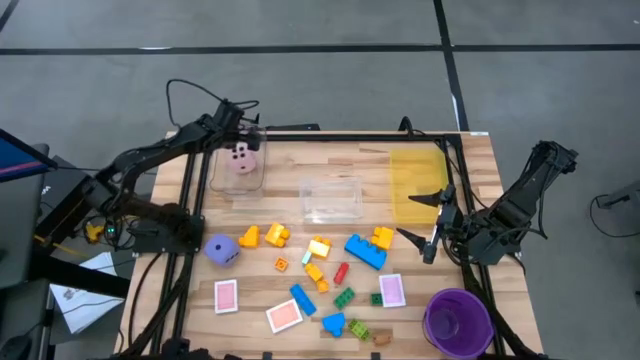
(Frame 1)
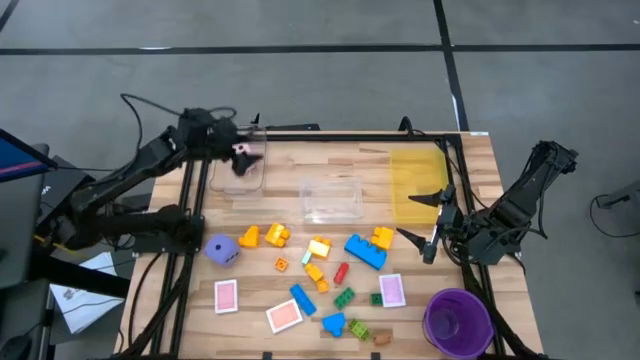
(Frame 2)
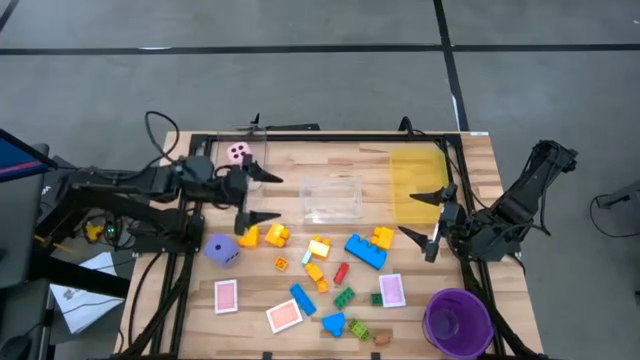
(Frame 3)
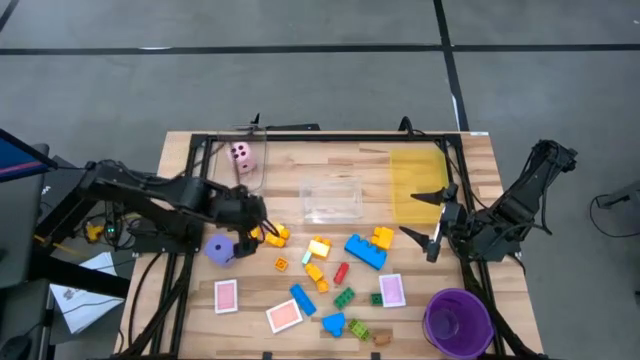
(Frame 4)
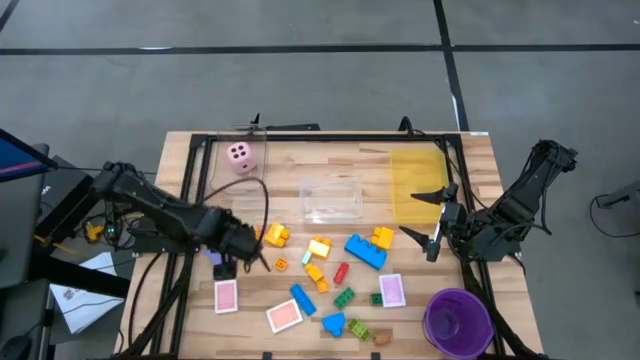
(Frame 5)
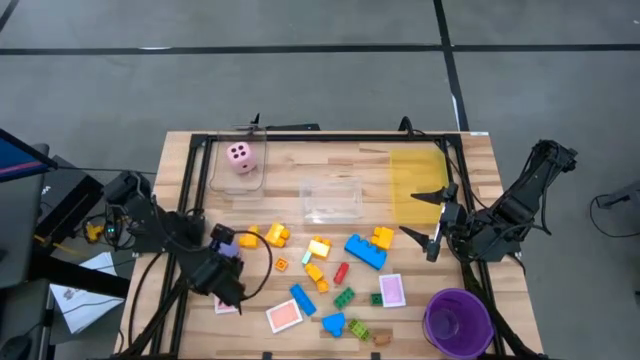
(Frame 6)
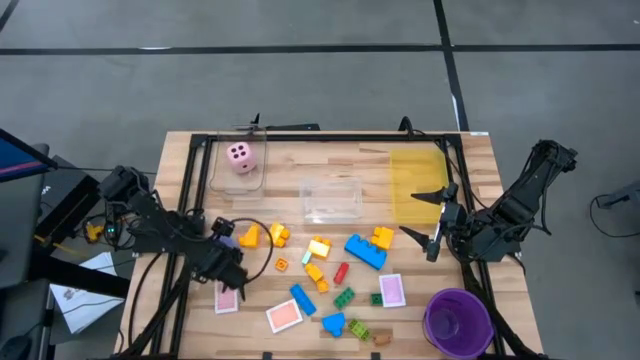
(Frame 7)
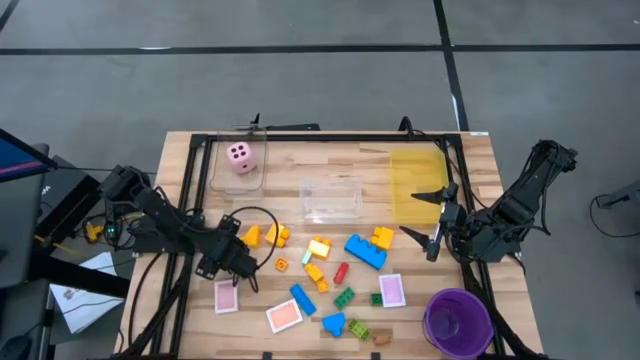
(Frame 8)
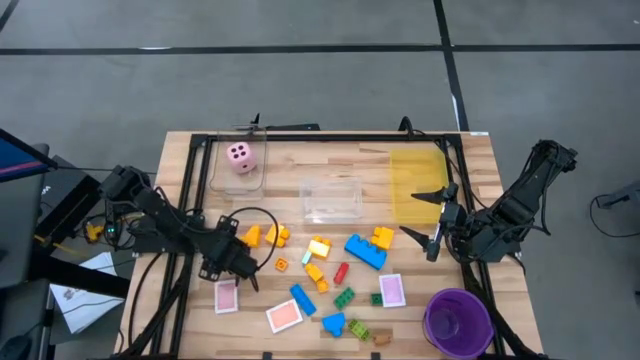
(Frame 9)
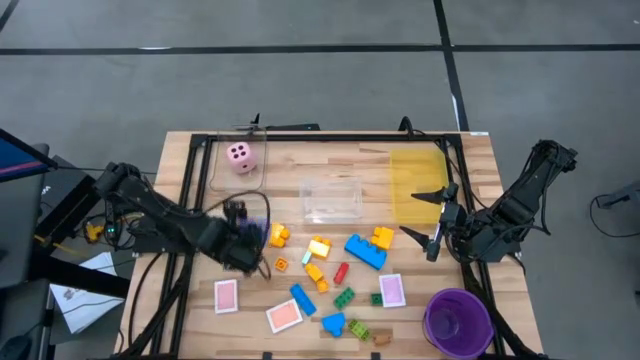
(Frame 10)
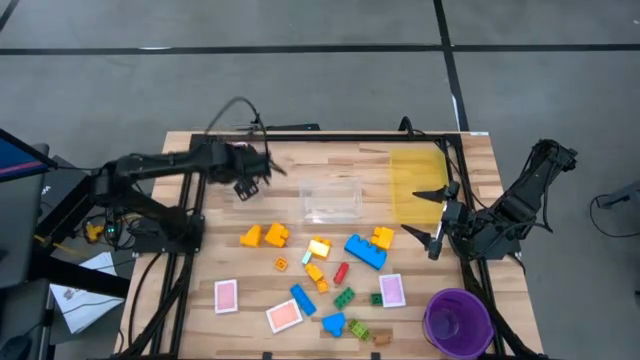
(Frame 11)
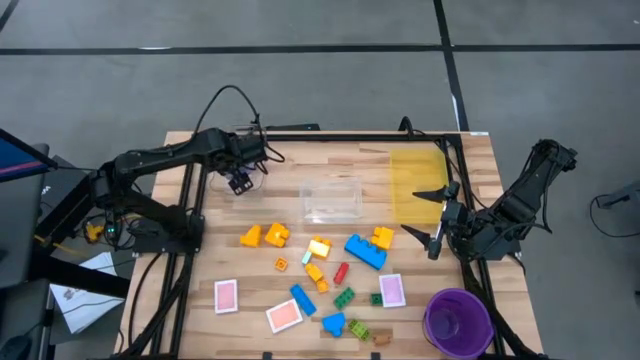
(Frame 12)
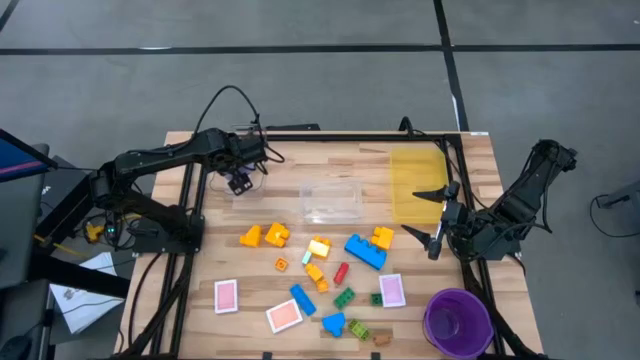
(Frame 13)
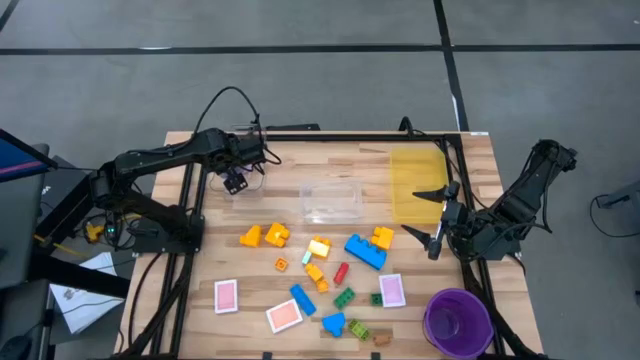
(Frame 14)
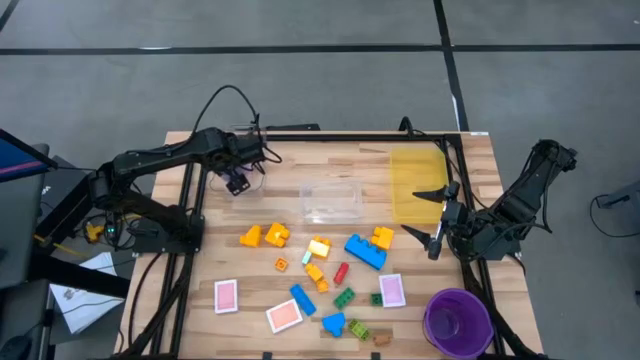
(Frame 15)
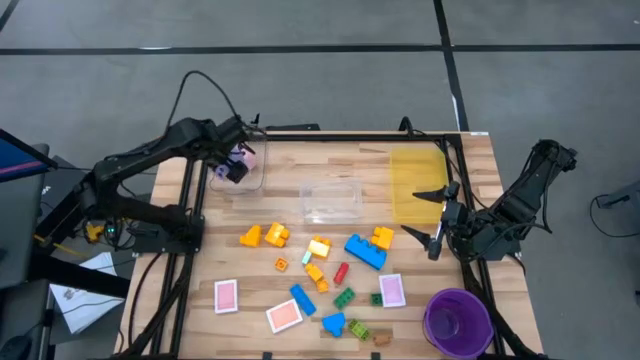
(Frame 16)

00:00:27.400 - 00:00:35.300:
Task: Pick & Place Toys
Put the purple die into the top transparent bin

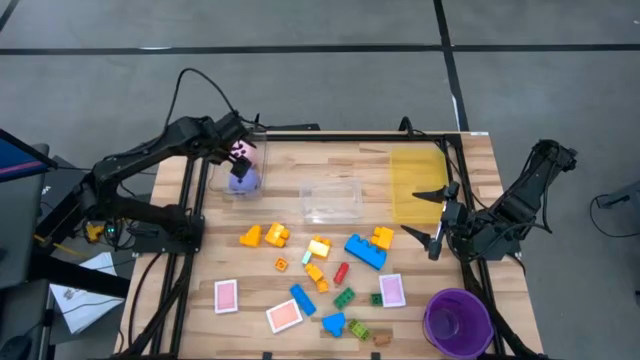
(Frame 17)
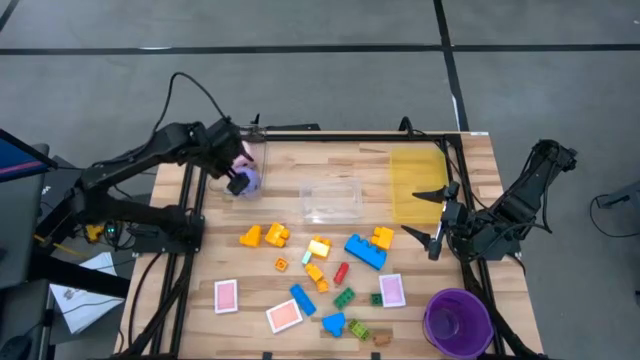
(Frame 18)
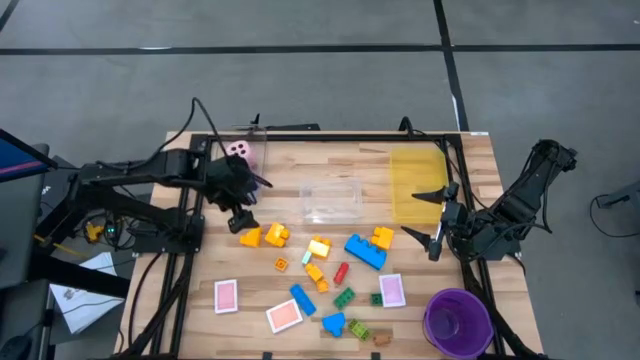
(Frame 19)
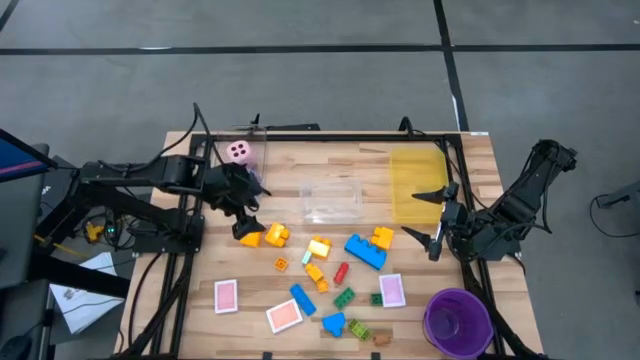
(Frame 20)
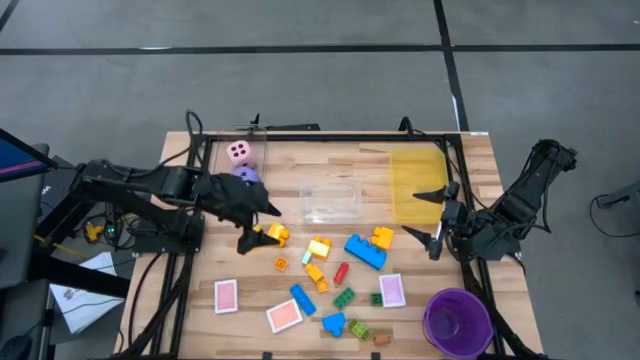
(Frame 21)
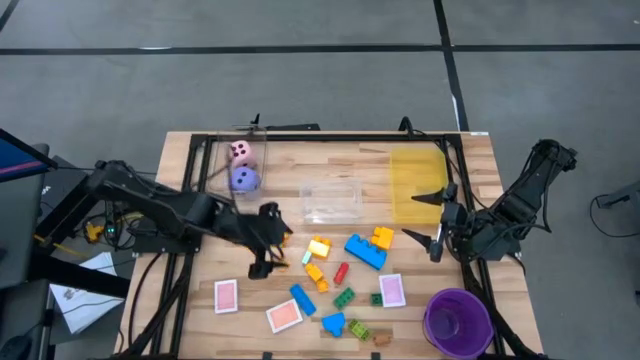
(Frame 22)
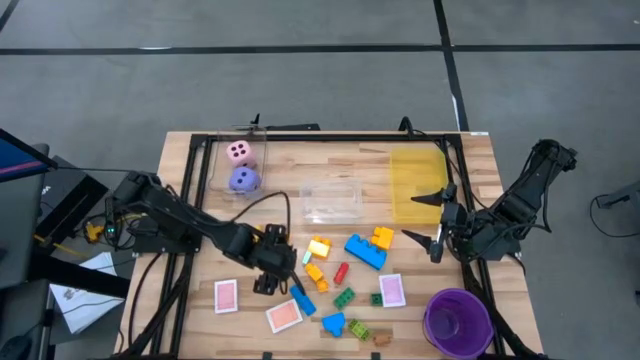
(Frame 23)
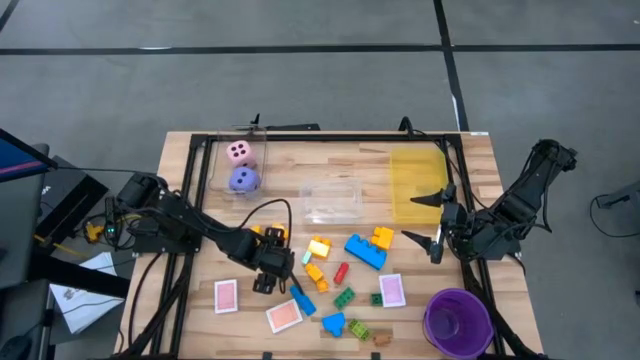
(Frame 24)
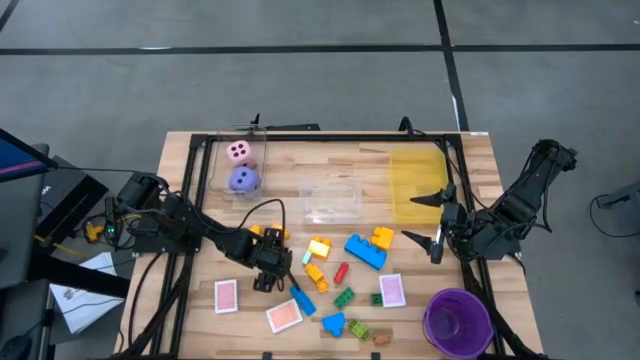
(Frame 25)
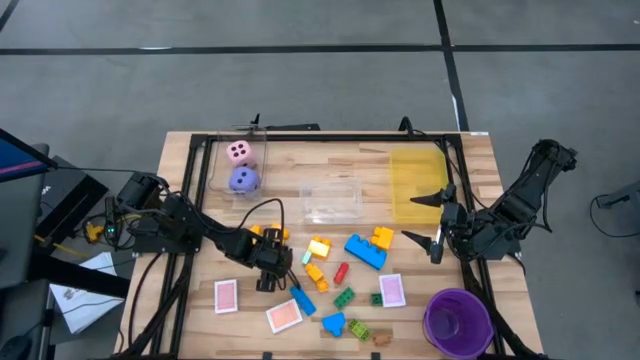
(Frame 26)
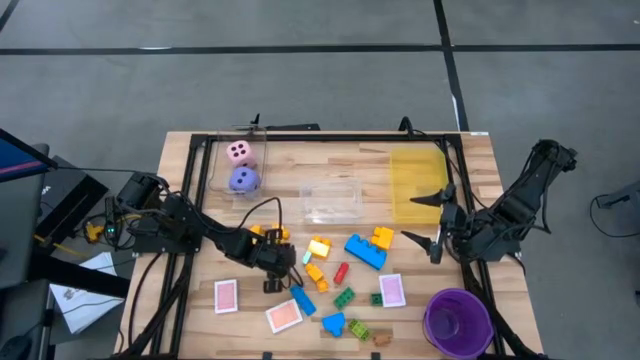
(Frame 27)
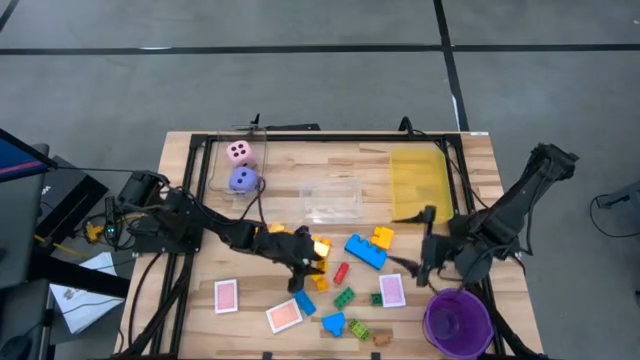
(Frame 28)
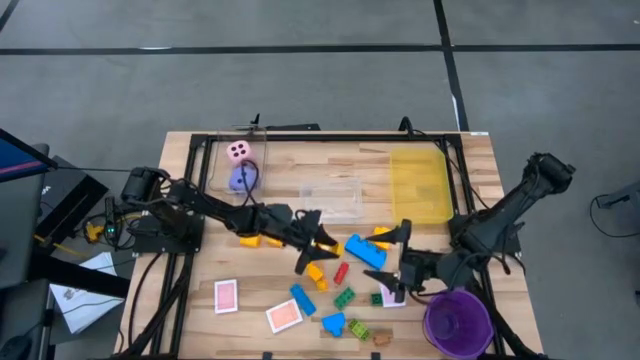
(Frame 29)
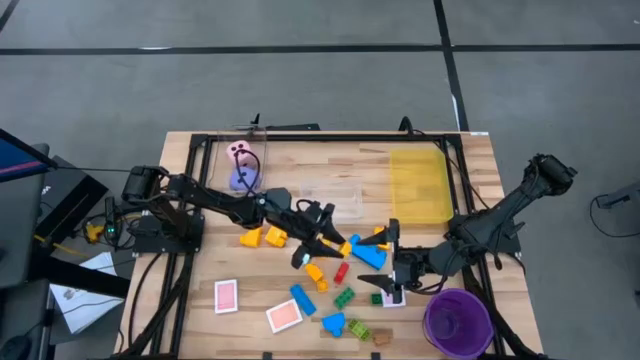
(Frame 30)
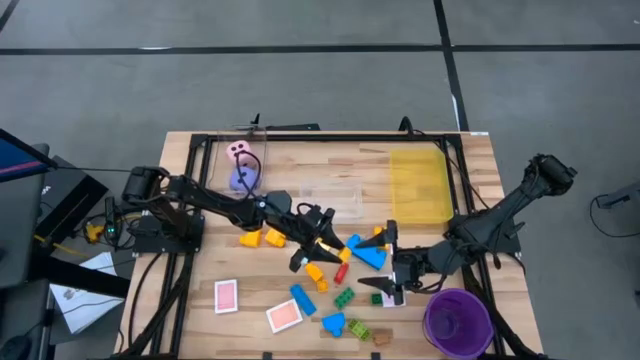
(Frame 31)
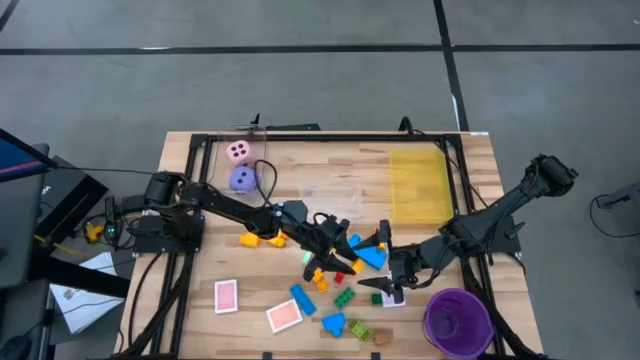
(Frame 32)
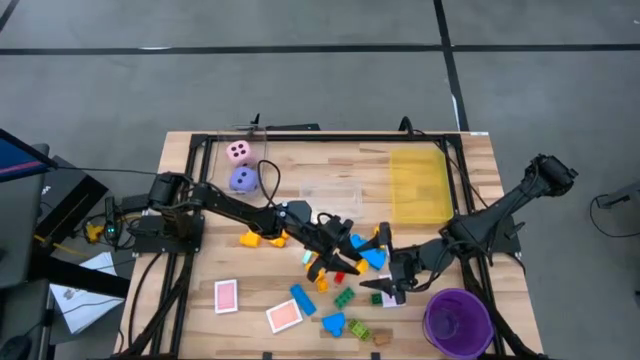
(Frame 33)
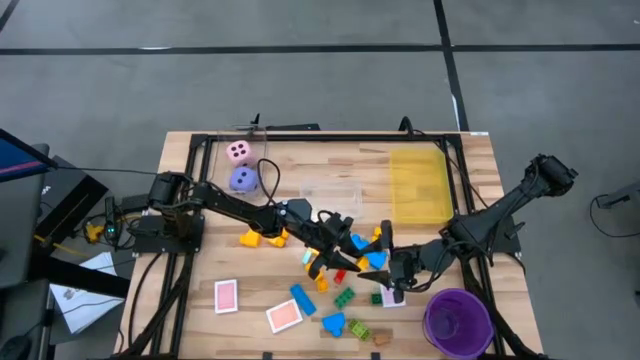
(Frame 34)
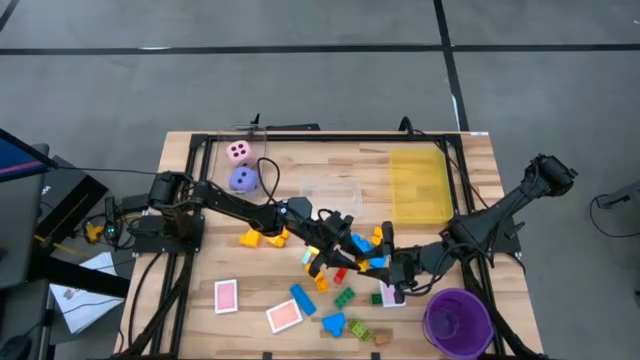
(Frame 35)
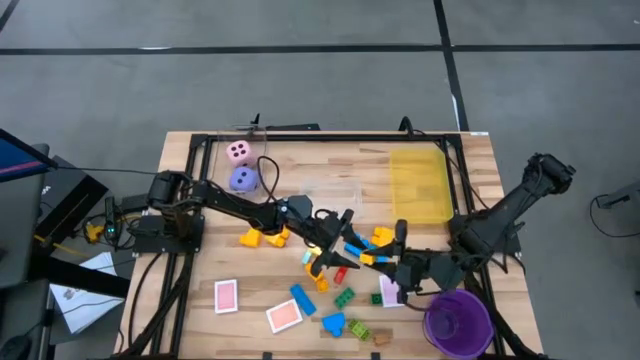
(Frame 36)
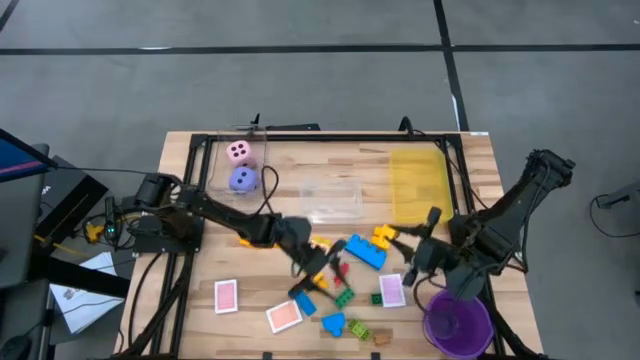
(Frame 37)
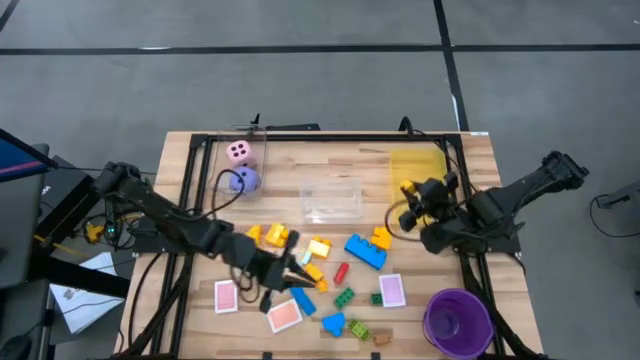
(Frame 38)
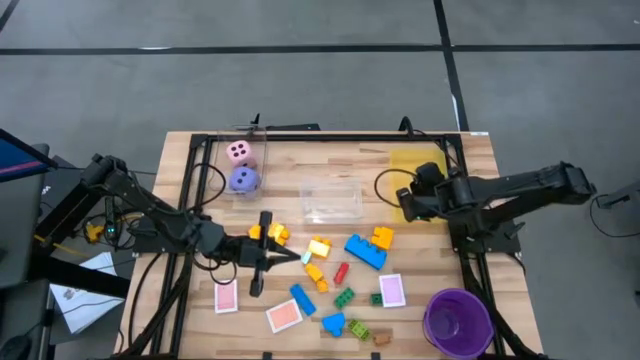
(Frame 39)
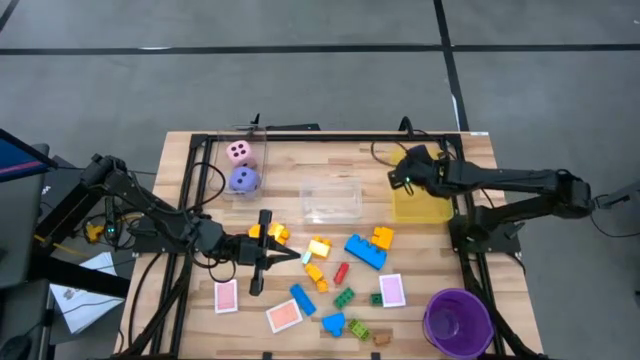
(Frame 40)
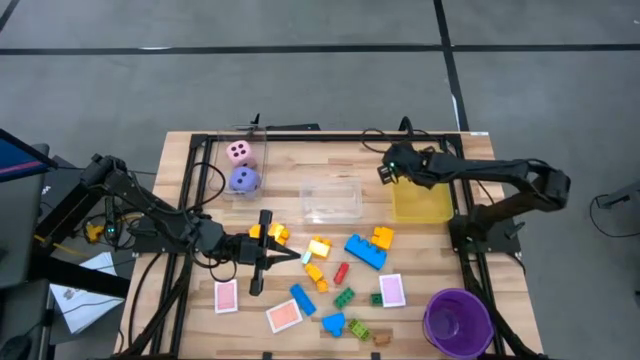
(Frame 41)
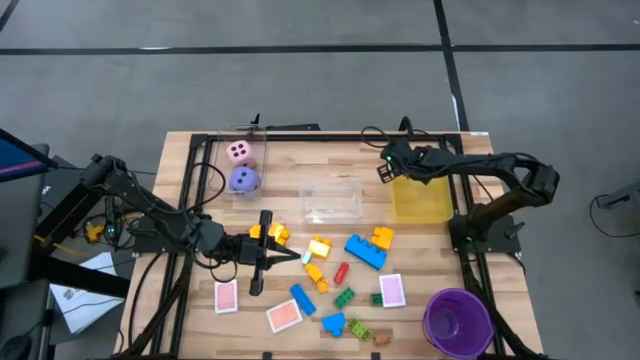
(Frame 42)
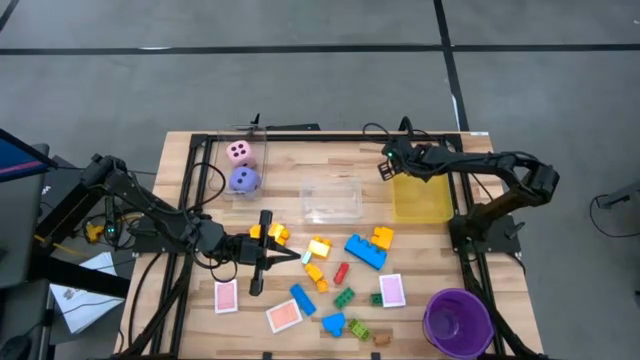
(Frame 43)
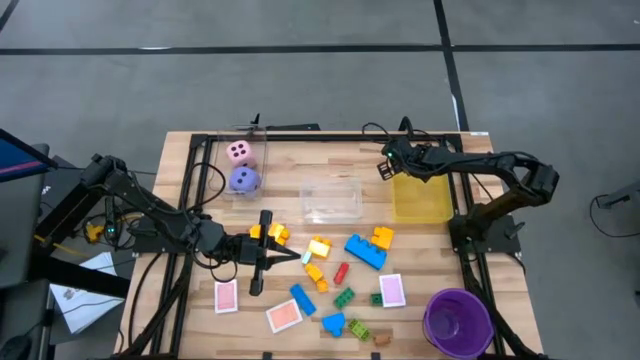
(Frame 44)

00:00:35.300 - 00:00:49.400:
Put the yellow game piece into the yellow bin
